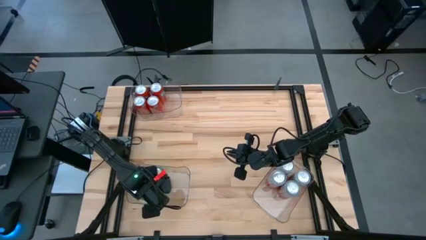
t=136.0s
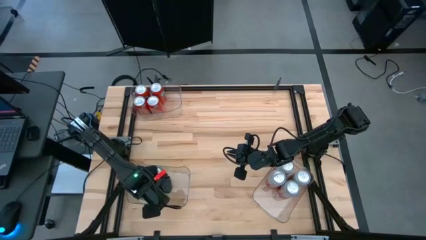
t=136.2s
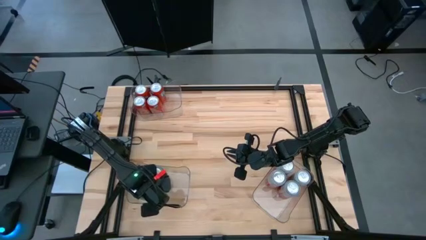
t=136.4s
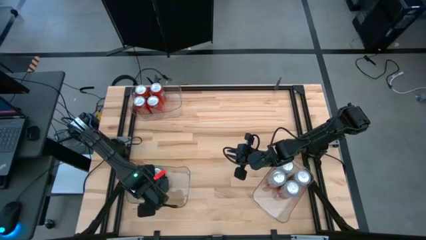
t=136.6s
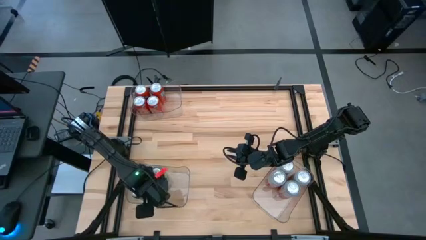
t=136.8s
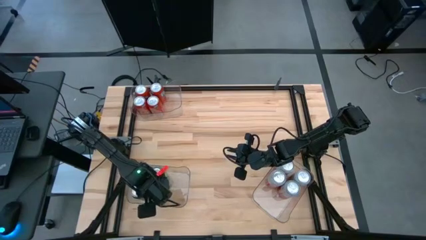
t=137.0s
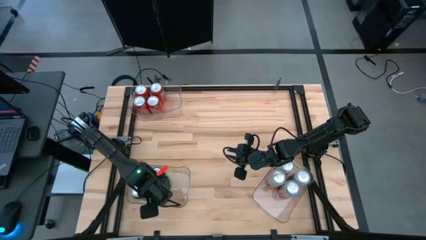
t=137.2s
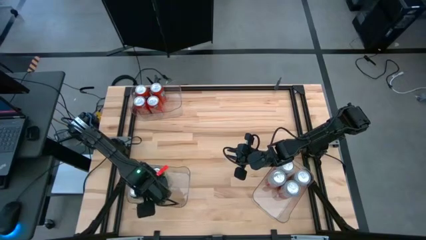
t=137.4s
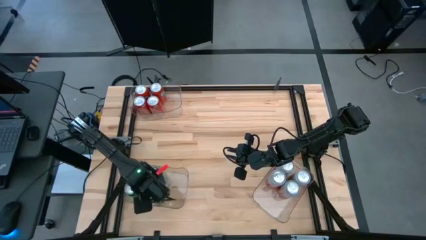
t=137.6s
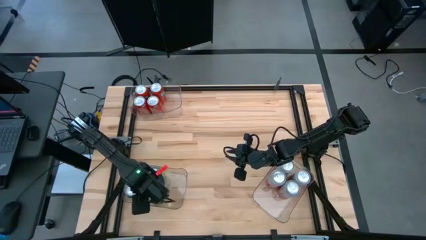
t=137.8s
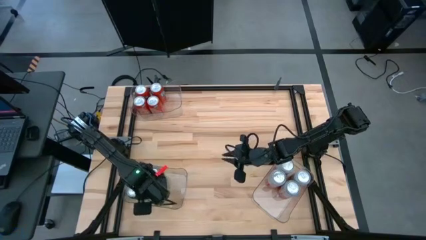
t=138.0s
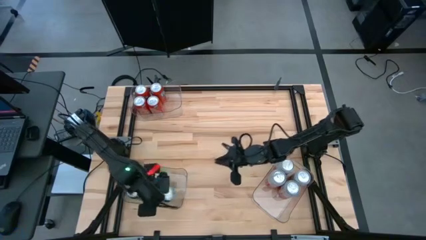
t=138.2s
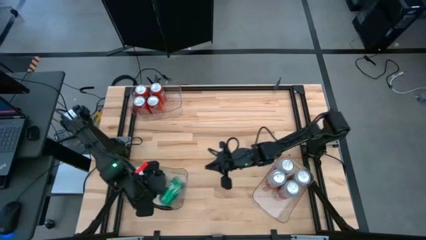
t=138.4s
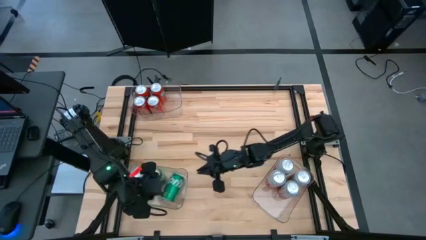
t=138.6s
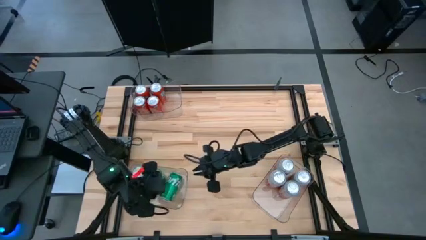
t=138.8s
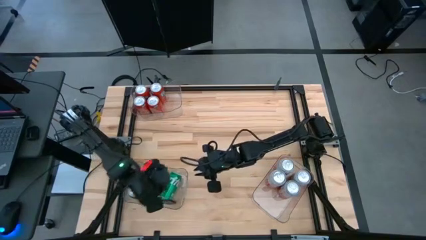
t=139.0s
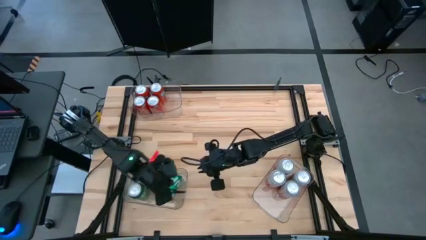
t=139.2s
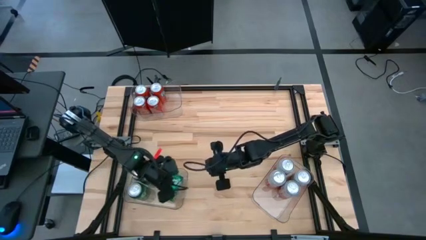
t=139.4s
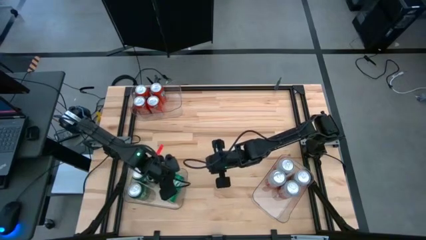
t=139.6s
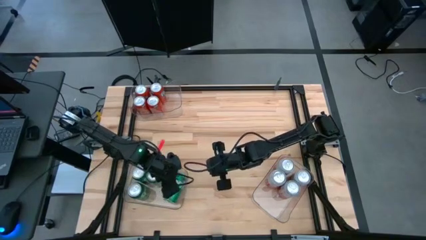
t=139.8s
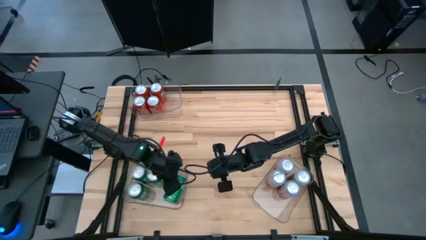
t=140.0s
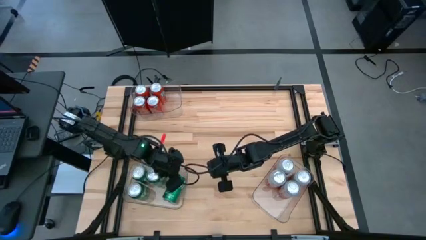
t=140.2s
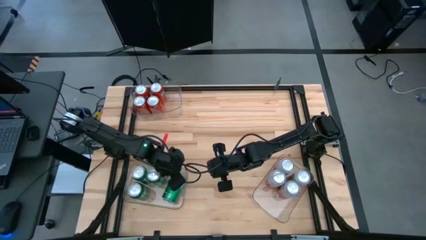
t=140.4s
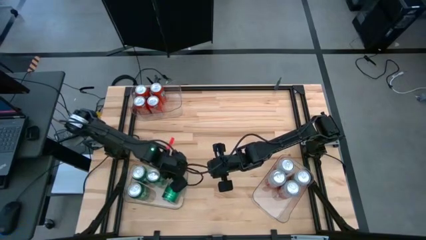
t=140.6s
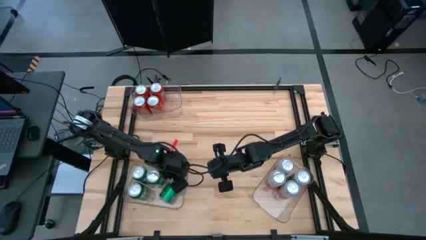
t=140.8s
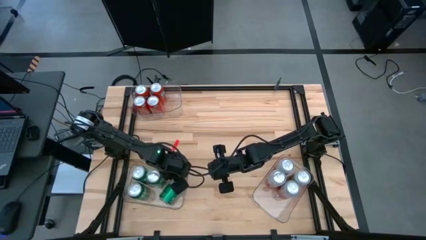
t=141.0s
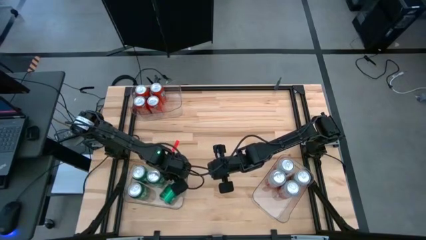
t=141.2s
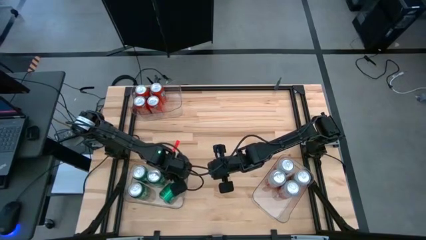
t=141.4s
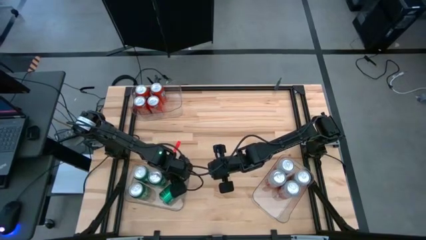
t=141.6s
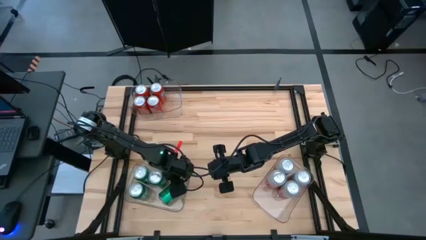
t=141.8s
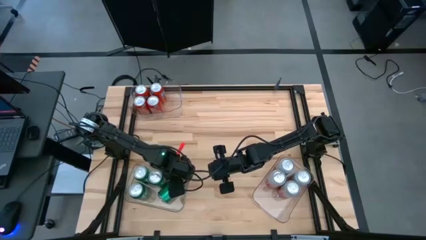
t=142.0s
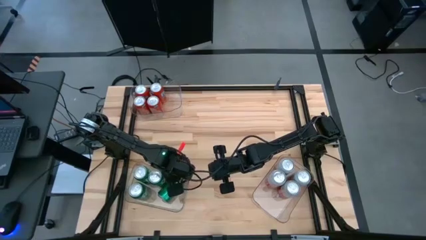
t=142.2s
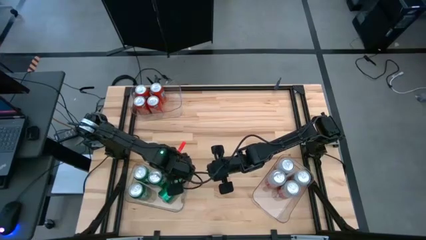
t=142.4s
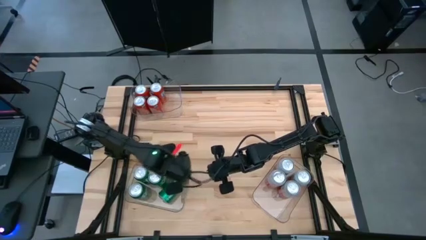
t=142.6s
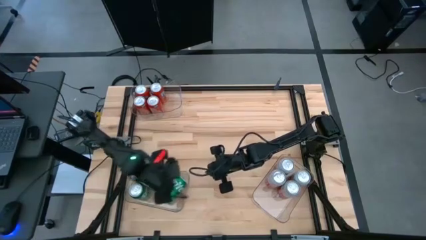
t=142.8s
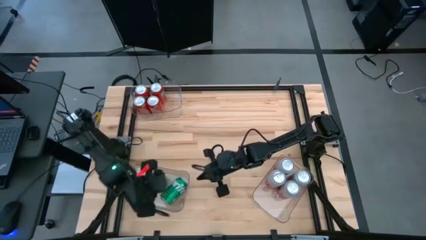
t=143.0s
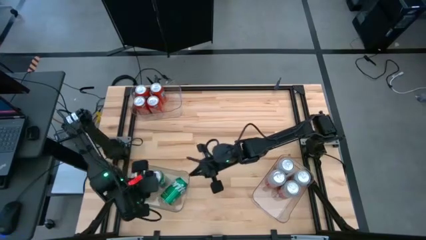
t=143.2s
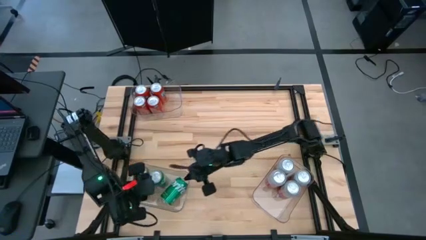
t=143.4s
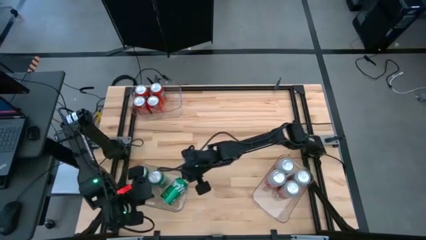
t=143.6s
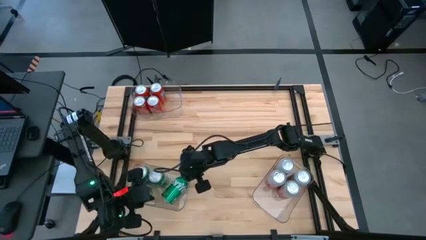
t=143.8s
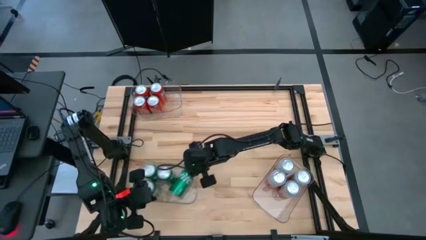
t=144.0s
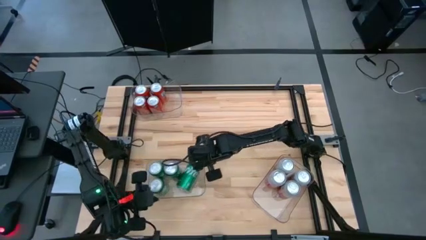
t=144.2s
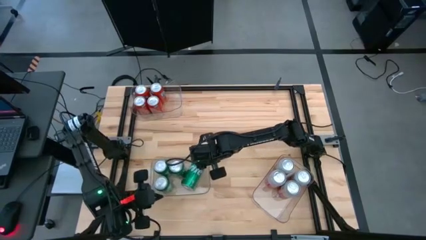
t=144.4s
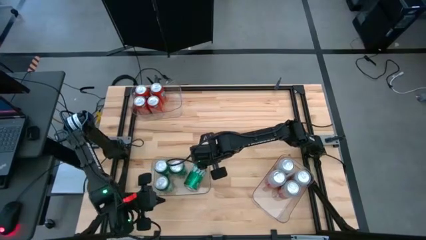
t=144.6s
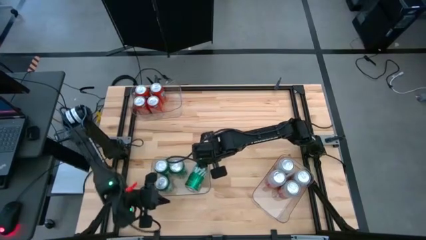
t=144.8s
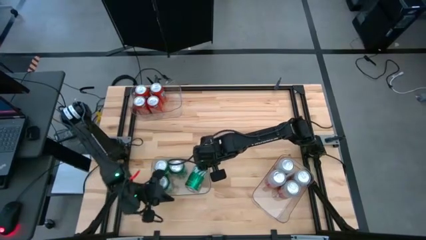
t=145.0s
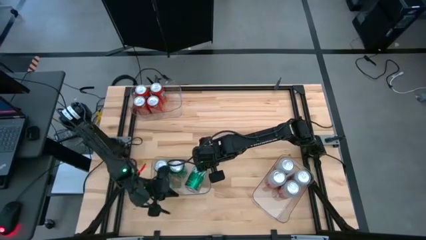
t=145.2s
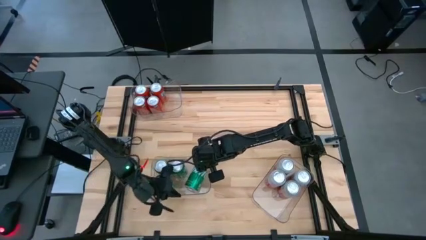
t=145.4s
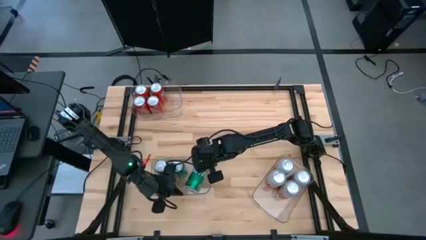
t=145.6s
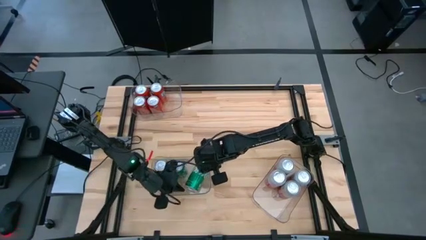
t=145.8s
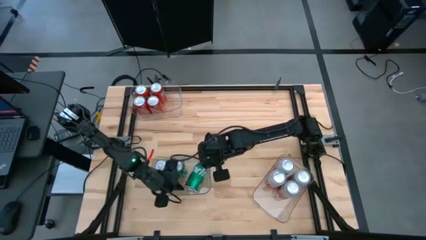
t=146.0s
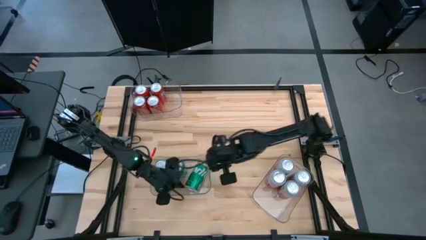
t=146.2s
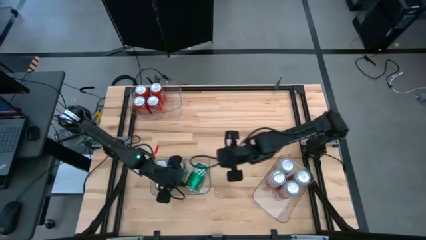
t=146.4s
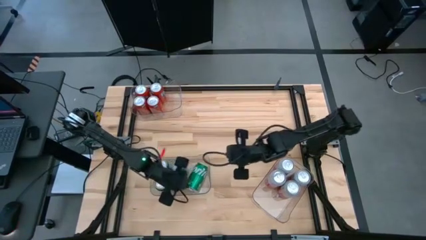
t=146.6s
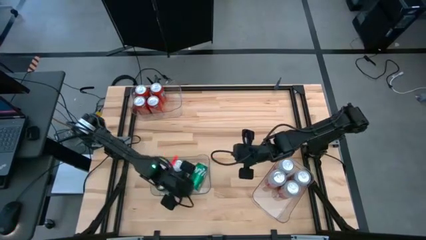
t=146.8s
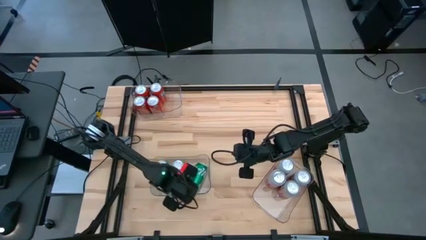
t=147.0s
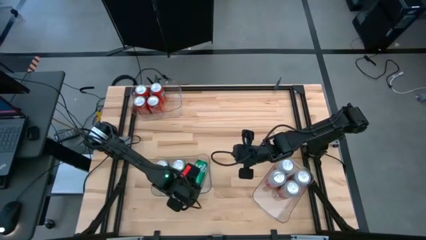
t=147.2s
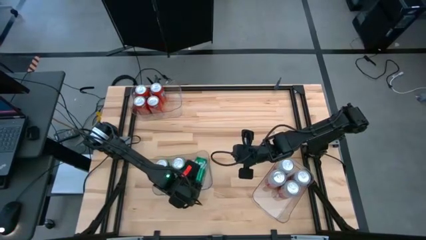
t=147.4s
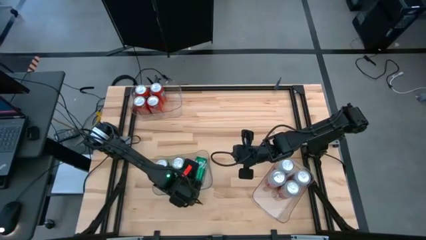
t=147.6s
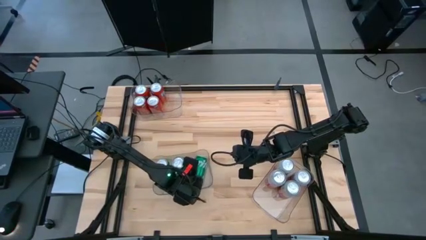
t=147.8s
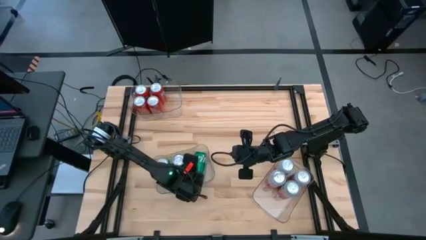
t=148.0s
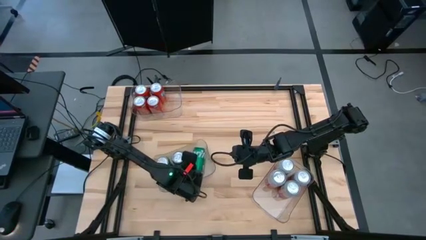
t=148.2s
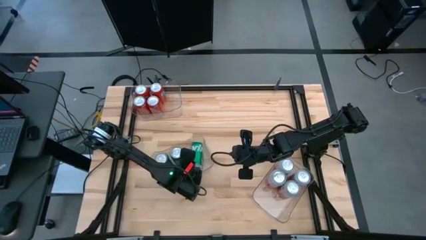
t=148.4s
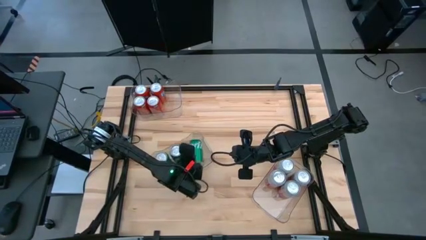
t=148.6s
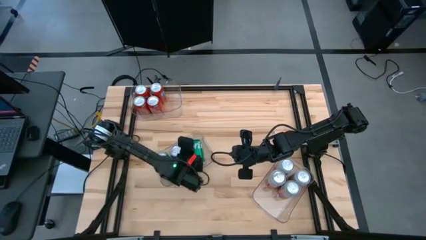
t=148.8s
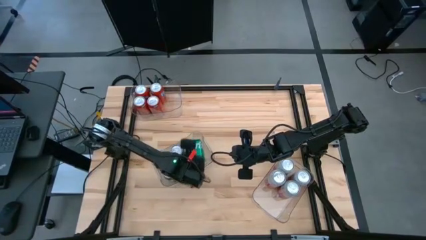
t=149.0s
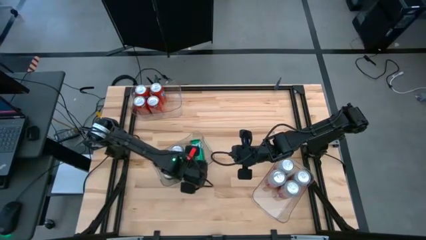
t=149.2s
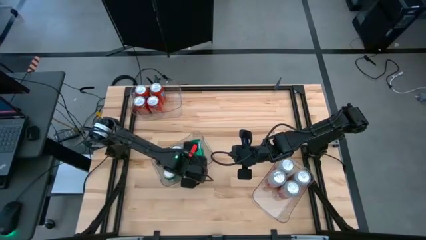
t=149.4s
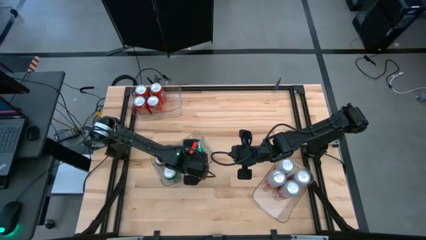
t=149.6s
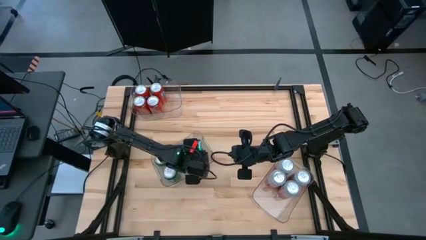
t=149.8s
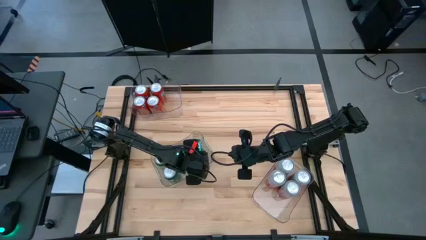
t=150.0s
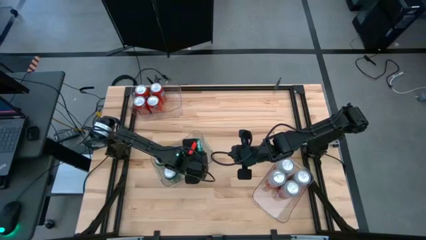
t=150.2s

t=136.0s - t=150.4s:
Task: Sort soda cans
Adjust the green soda can in the transparent bin
